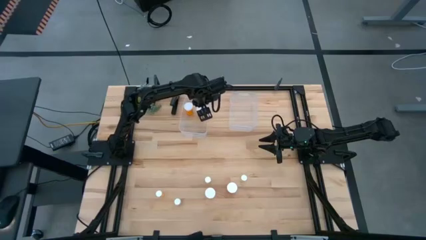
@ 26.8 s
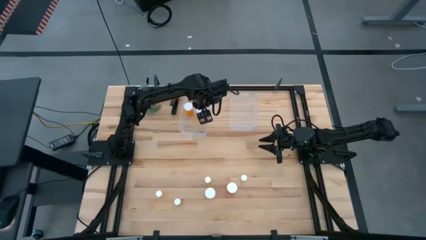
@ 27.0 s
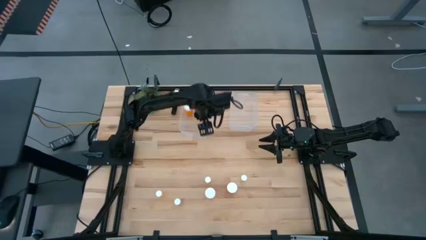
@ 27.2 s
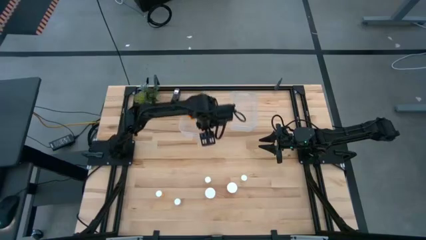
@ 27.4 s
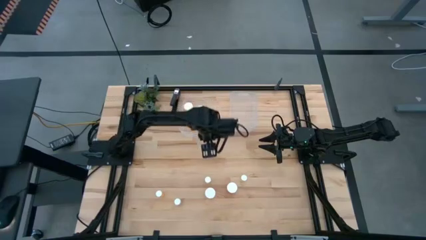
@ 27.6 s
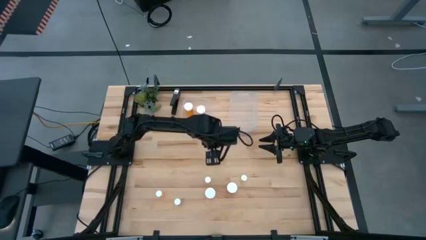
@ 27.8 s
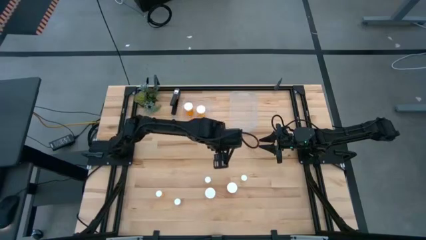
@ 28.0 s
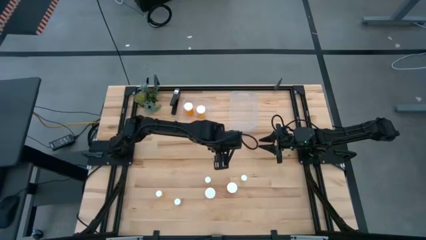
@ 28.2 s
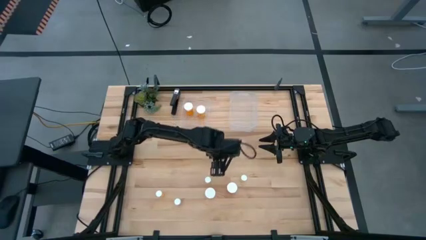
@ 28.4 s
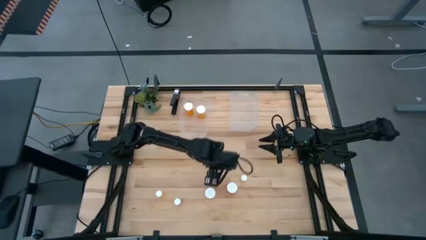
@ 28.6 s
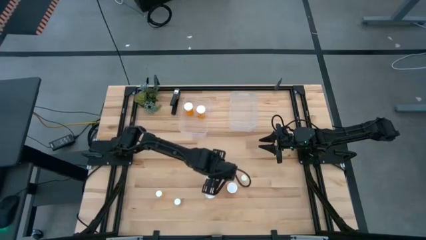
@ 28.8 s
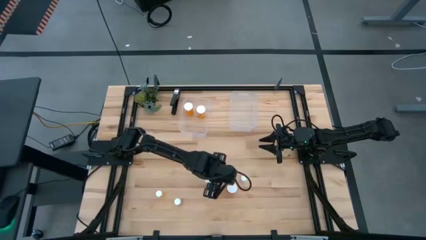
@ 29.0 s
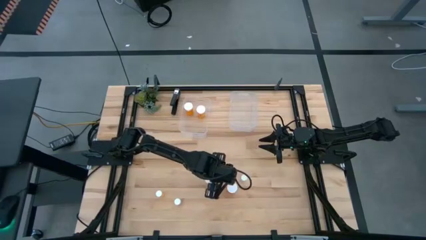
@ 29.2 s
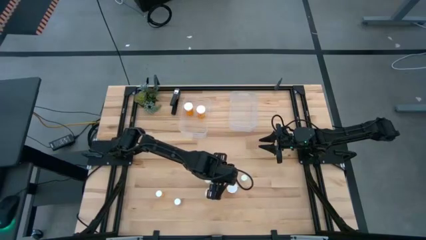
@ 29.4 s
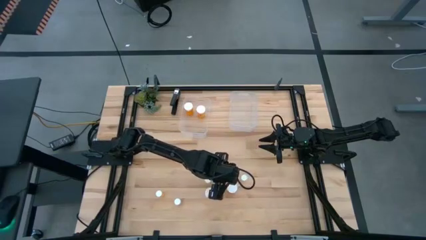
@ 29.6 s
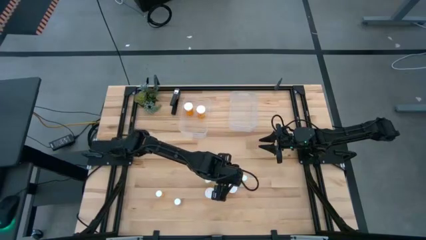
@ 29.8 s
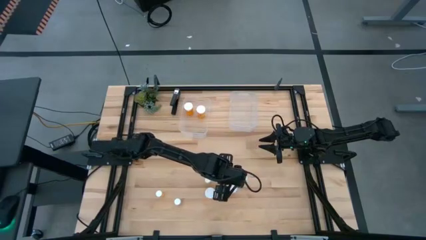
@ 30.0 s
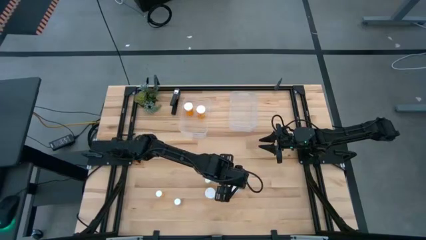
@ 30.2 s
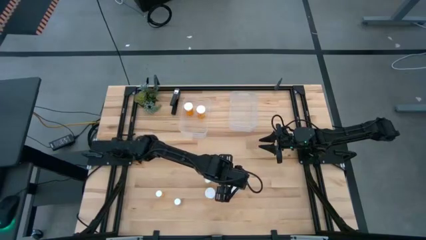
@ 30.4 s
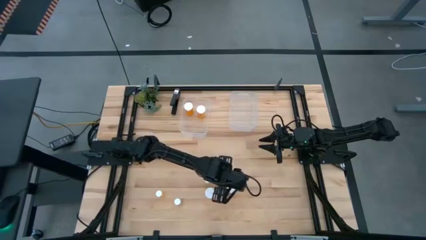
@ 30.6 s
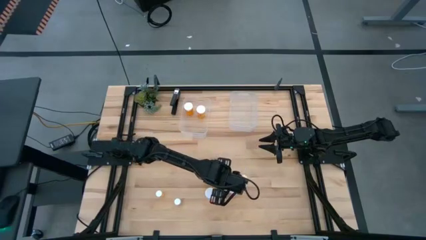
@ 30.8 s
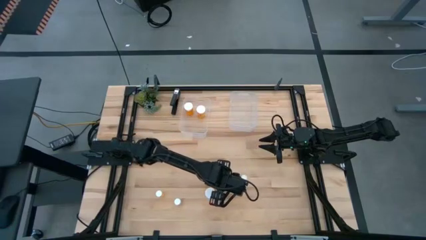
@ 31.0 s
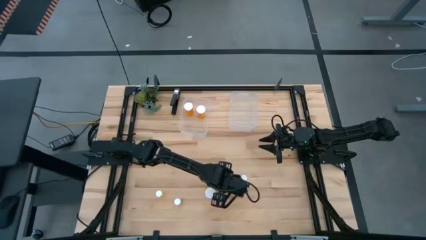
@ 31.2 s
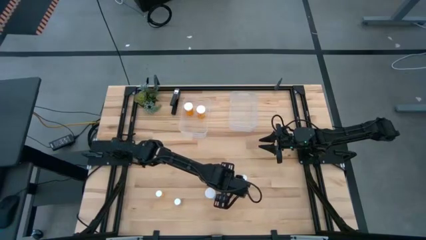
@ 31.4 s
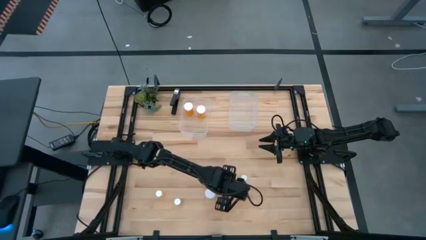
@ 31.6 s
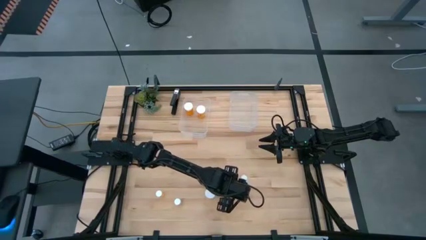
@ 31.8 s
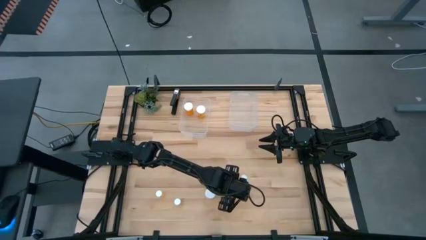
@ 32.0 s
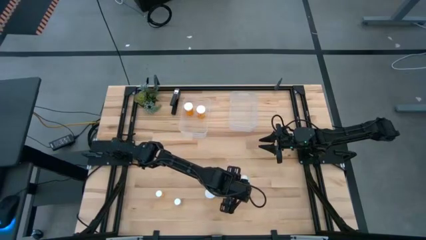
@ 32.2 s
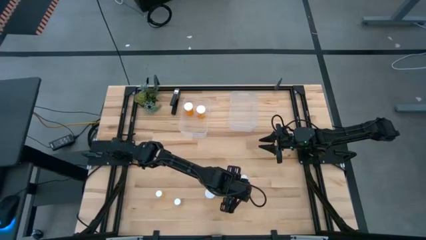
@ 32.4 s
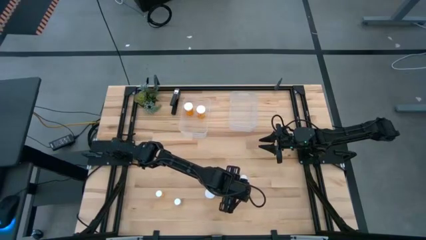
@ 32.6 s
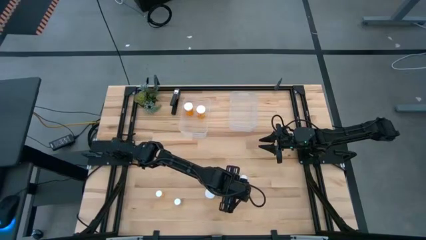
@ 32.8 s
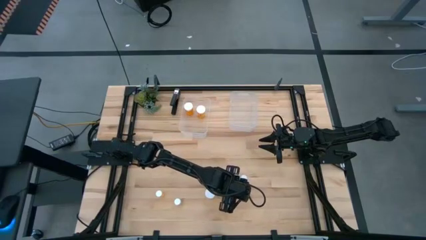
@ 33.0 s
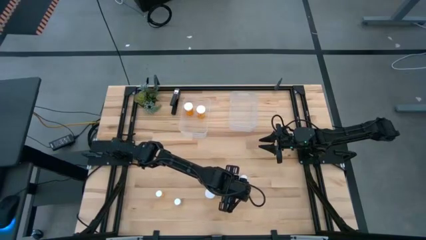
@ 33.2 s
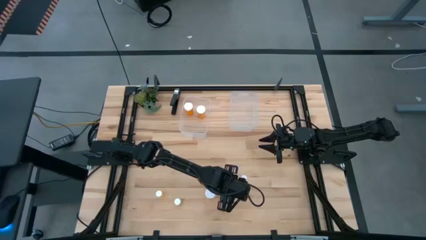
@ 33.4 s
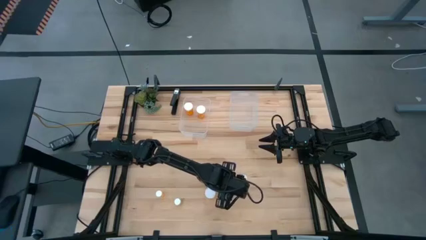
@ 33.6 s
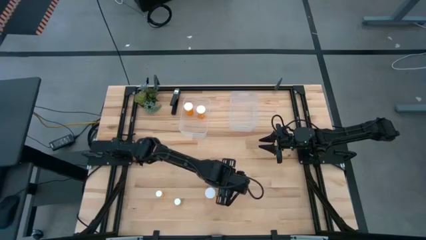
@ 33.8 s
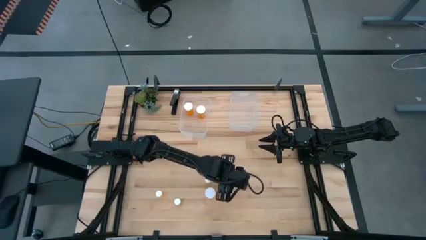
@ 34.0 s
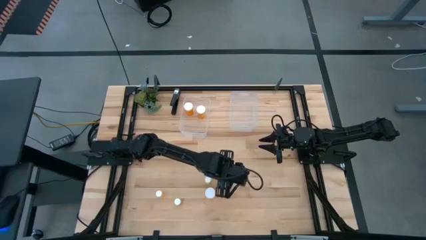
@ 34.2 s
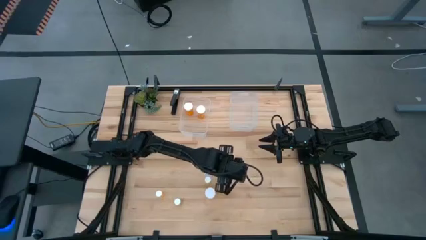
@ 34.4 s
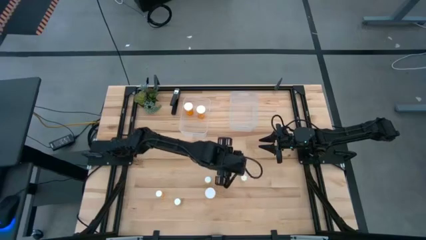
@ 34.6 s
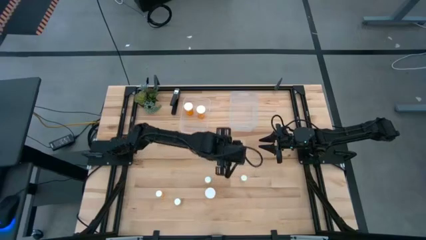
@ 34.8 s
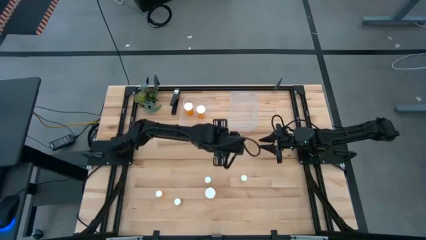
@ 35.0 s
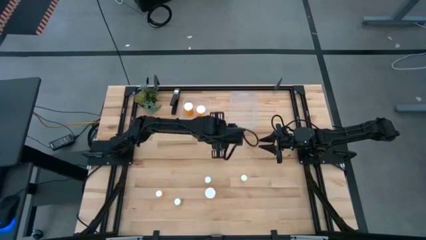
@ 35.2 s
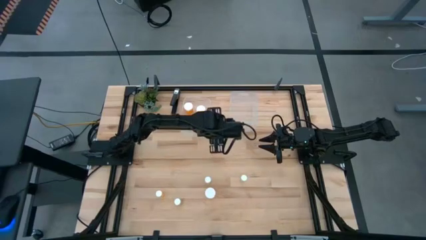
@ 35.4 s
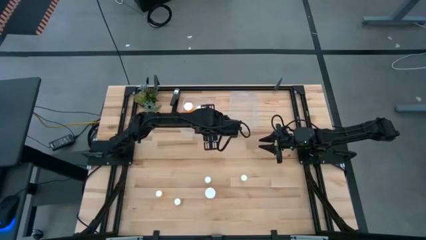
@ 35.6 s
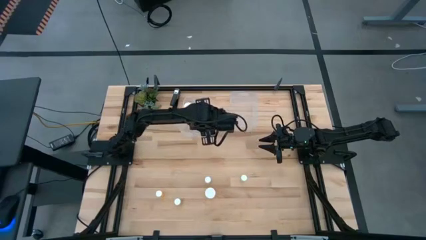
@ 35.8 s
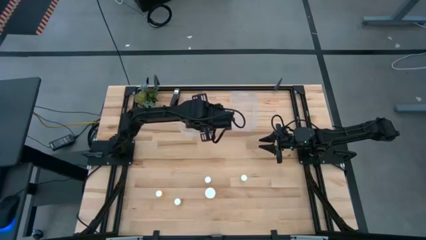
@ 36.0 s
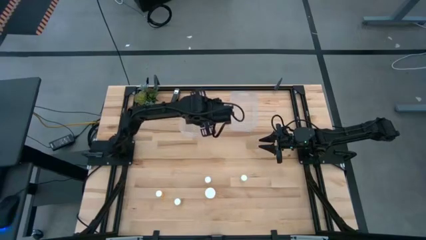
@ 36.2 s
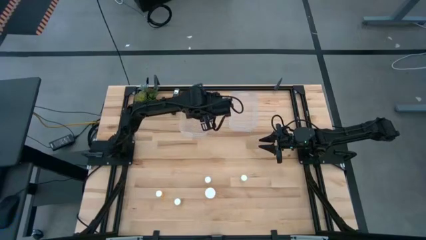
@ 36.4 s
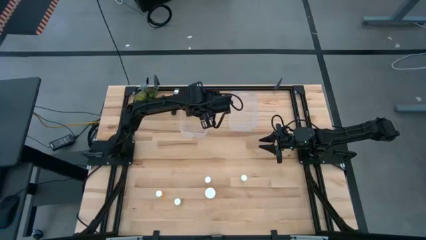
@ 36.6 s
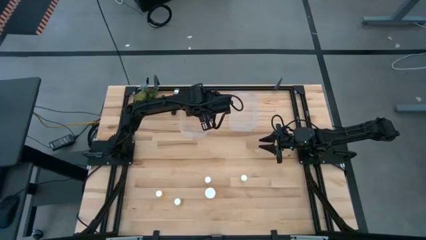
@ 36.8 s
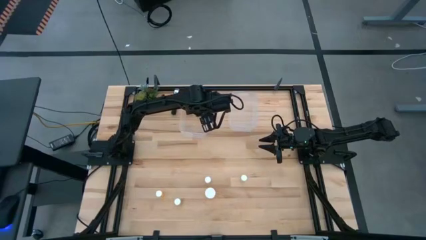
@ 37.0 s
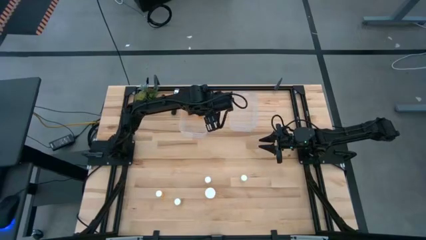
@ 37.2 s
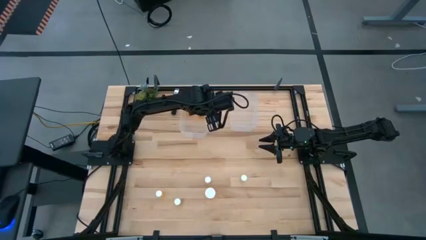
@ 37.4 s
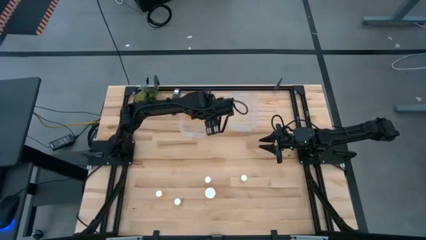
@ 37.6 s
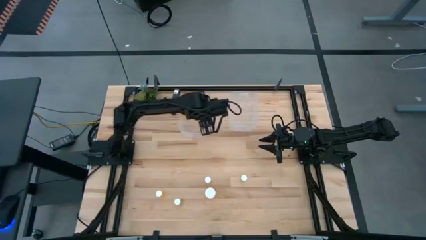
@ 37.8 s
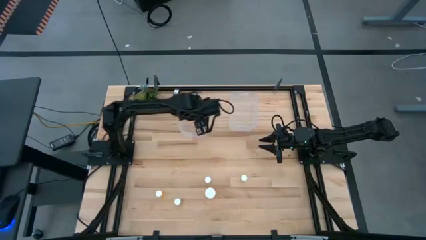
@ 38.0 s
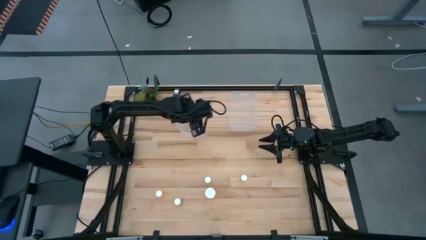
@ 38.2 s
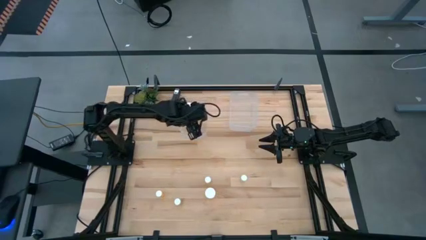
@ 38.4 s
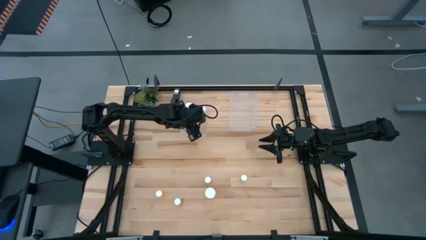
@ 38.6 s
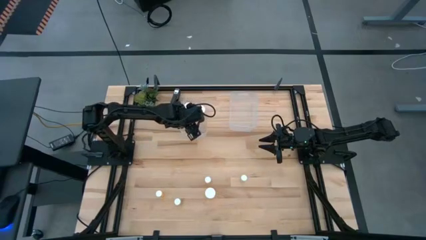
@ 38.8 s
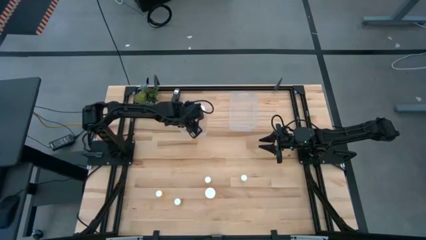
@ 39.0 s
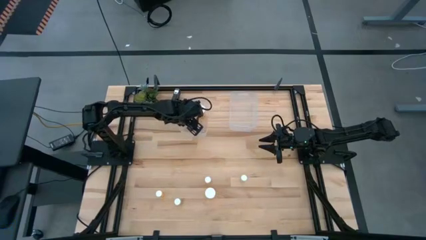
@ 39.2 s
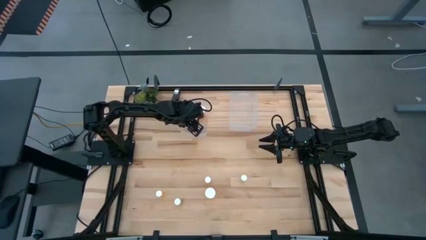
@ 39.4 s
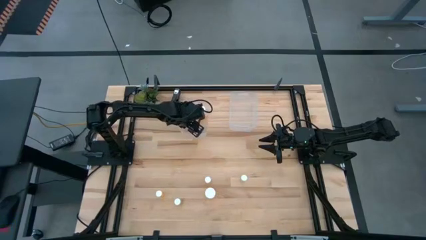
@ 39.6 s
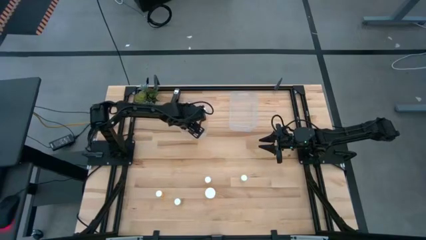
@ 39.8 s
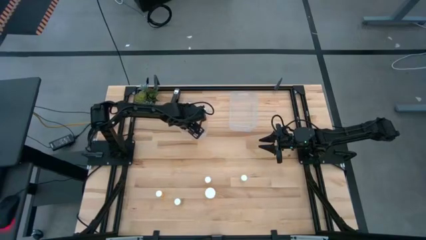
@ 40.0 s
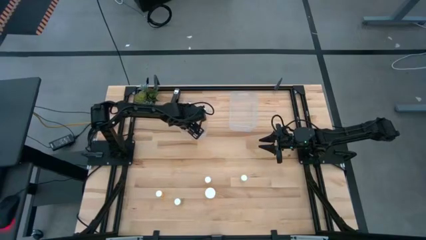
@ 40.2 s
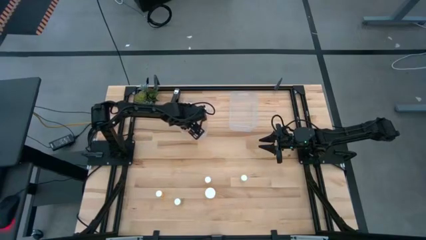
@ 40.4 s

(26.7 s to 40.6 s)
Task: Pick and place medicine bottles into bin by pill shape (circle, oval)
Put the big orange pill bottle in the left transparent bin
